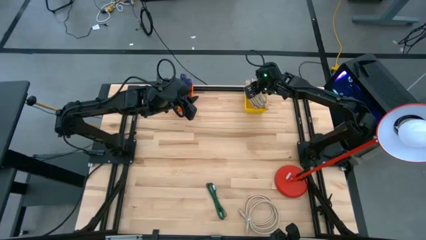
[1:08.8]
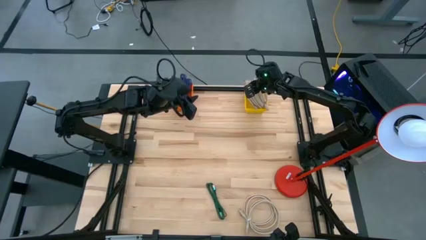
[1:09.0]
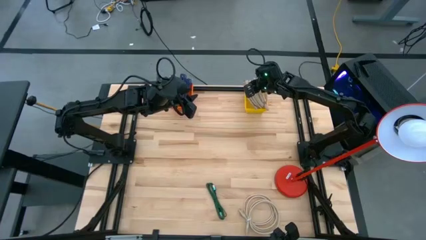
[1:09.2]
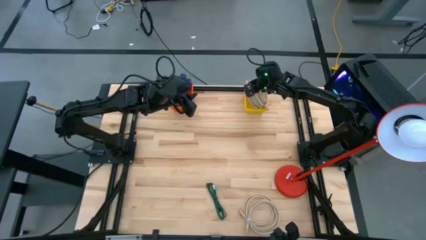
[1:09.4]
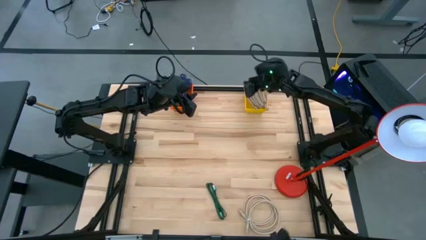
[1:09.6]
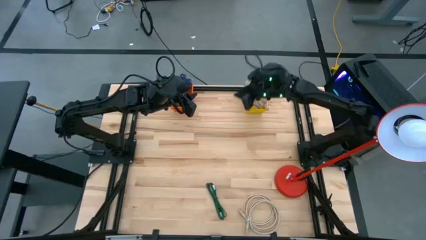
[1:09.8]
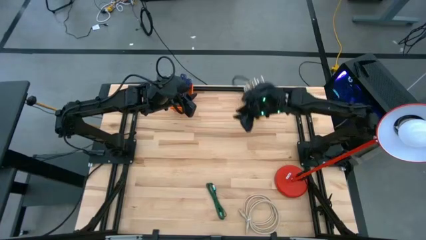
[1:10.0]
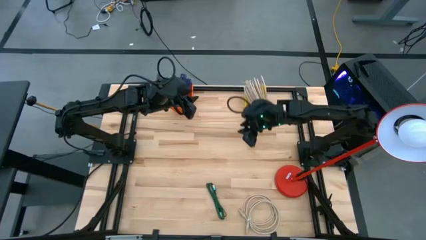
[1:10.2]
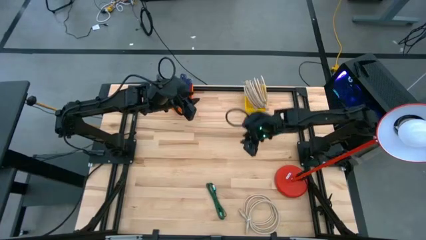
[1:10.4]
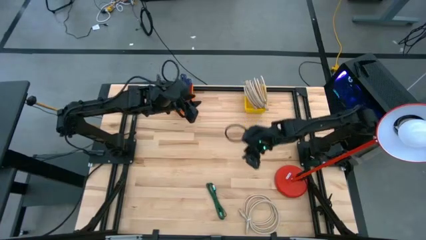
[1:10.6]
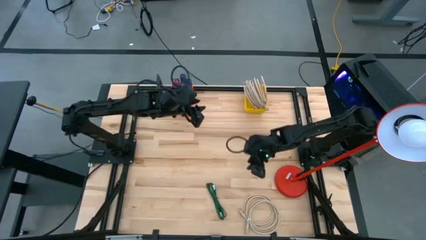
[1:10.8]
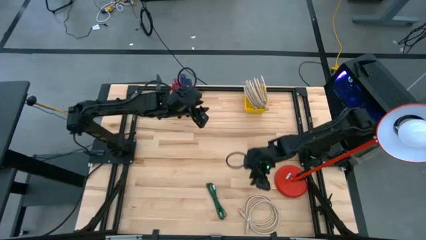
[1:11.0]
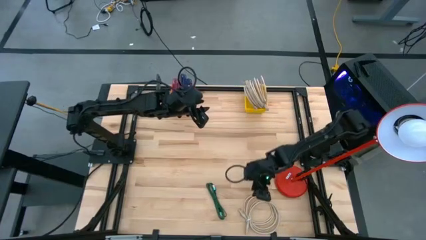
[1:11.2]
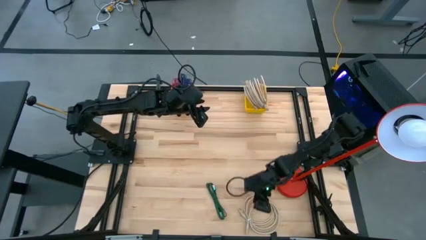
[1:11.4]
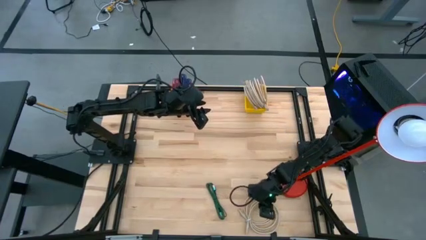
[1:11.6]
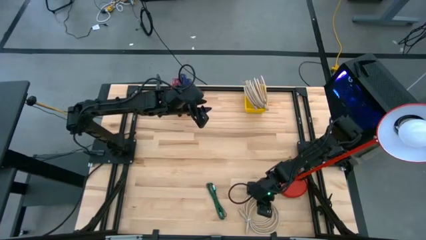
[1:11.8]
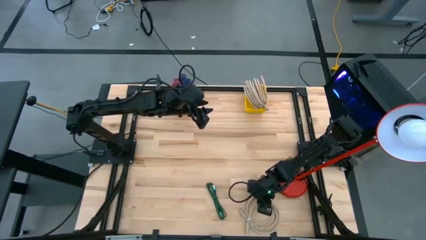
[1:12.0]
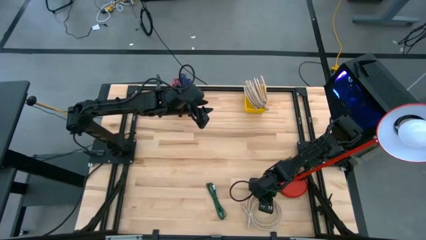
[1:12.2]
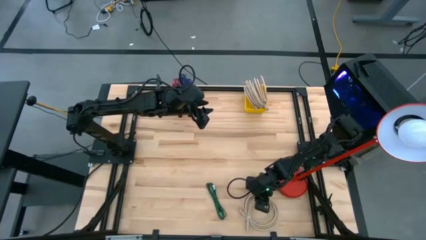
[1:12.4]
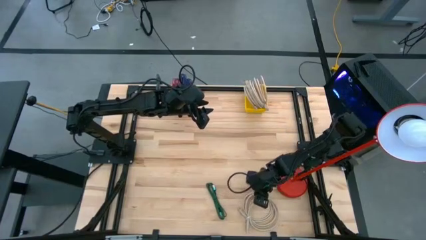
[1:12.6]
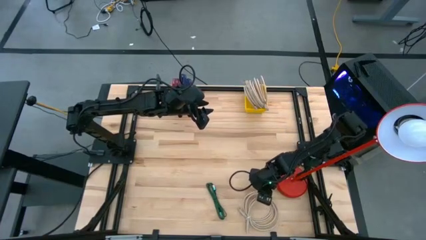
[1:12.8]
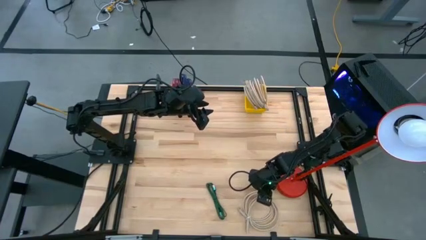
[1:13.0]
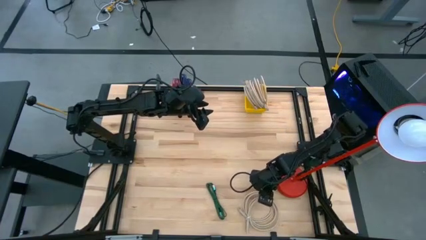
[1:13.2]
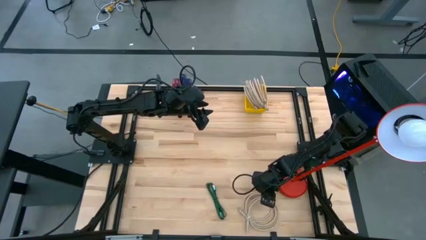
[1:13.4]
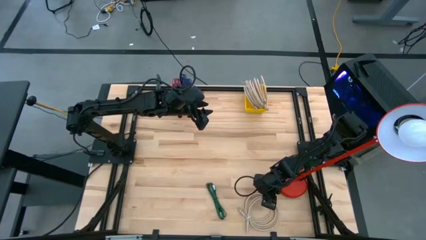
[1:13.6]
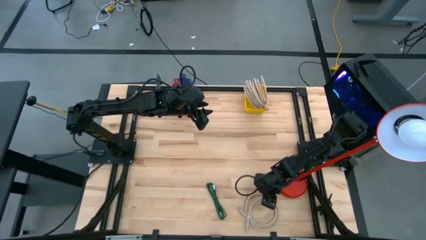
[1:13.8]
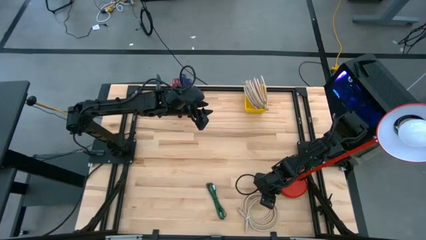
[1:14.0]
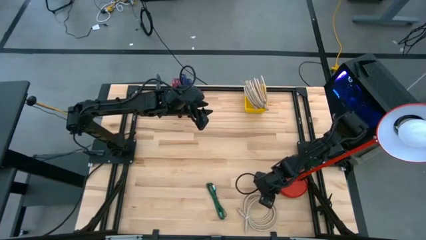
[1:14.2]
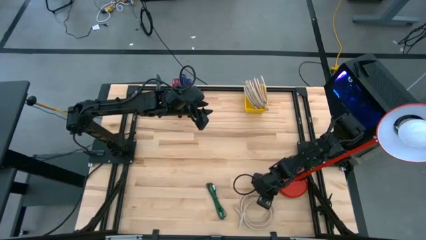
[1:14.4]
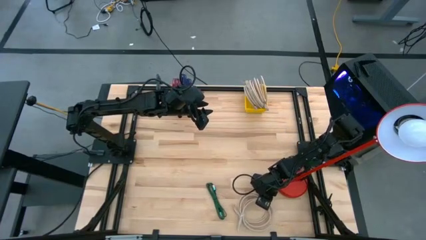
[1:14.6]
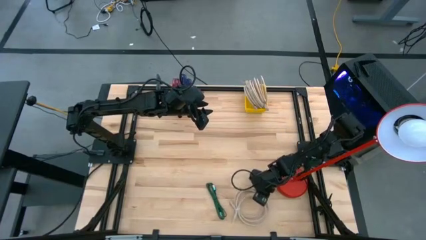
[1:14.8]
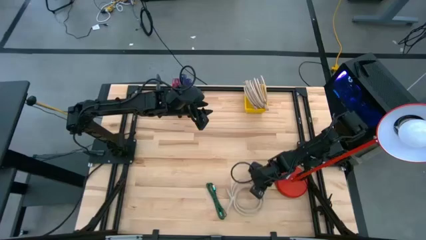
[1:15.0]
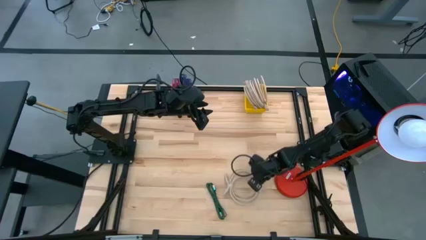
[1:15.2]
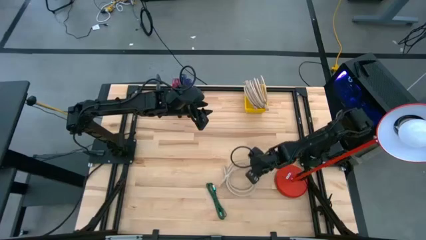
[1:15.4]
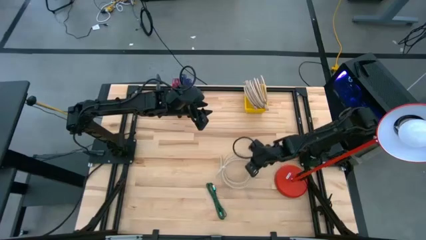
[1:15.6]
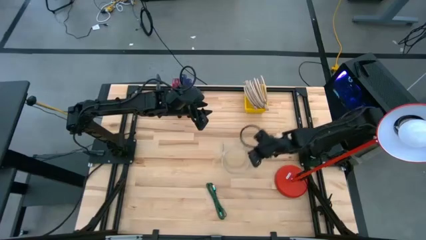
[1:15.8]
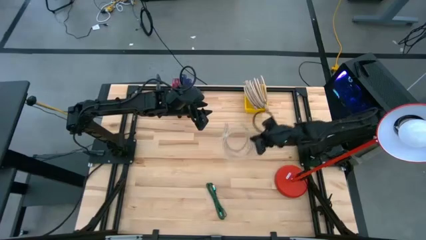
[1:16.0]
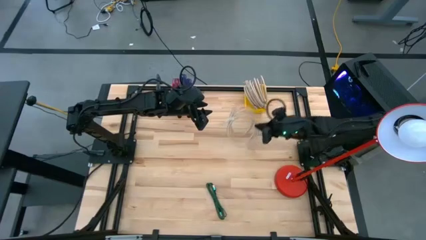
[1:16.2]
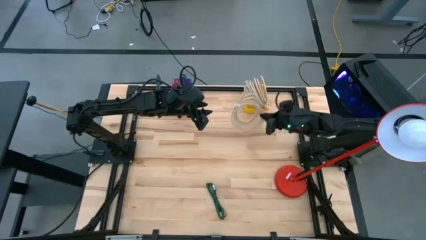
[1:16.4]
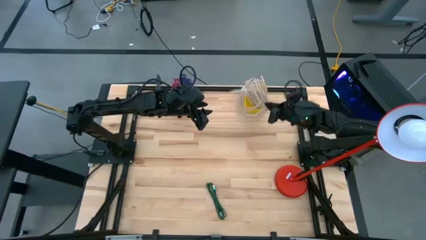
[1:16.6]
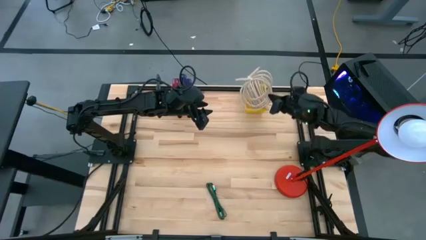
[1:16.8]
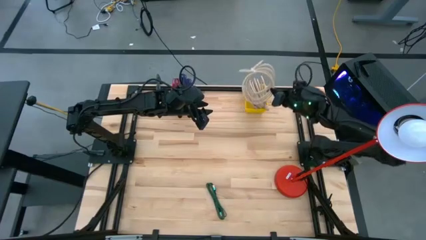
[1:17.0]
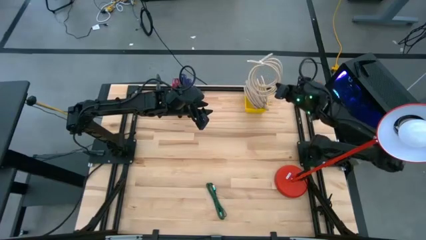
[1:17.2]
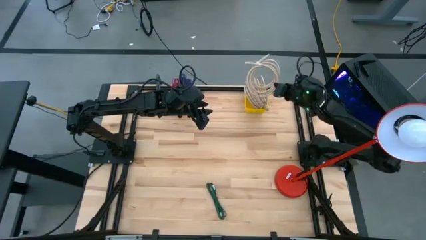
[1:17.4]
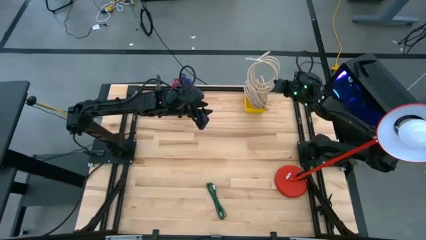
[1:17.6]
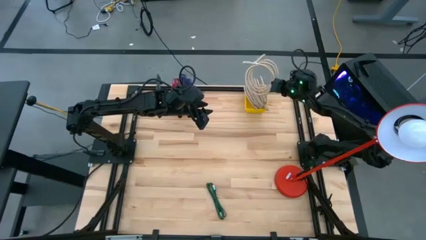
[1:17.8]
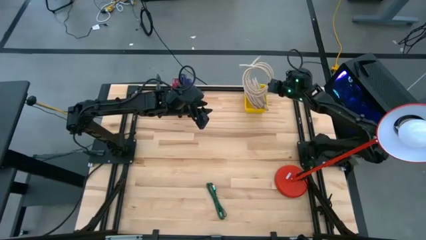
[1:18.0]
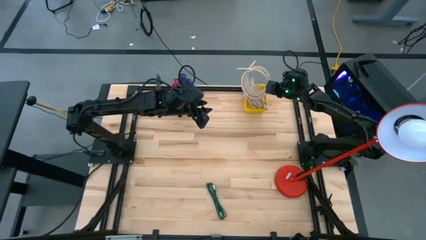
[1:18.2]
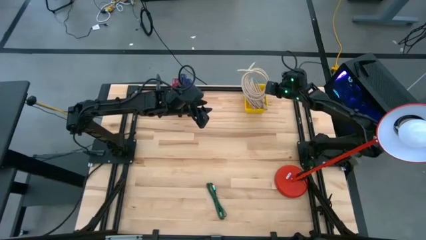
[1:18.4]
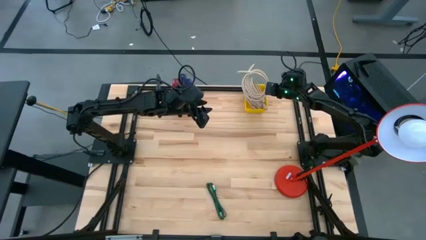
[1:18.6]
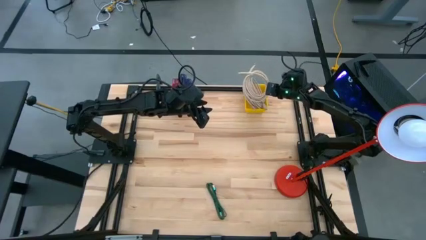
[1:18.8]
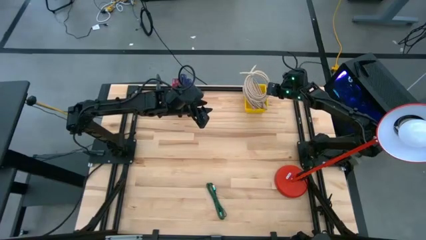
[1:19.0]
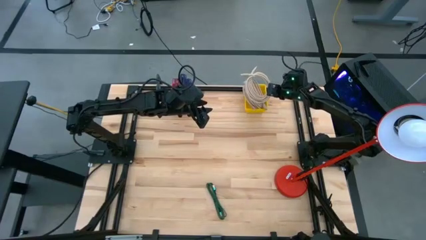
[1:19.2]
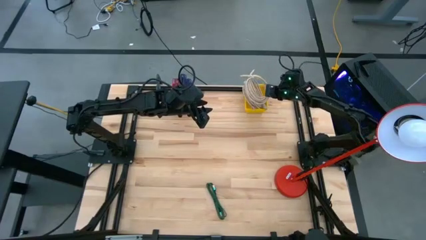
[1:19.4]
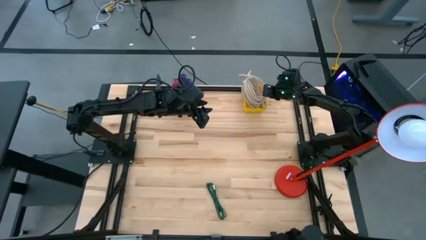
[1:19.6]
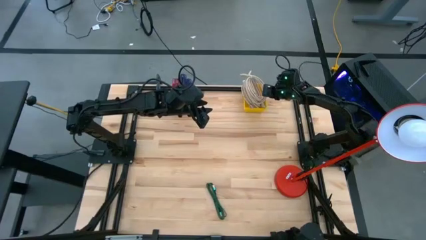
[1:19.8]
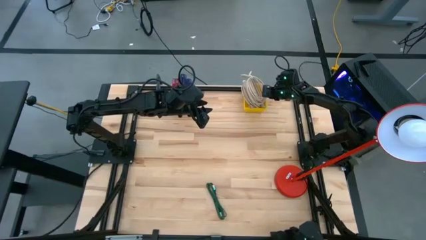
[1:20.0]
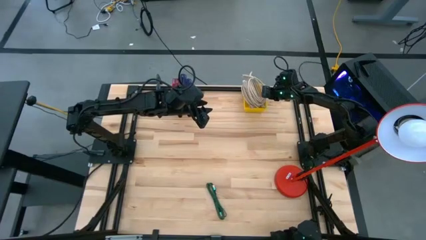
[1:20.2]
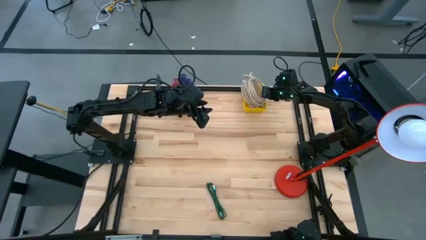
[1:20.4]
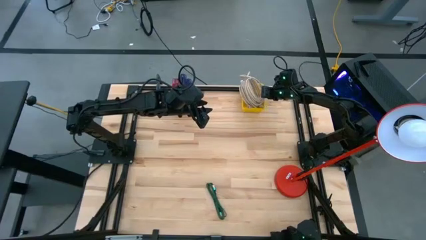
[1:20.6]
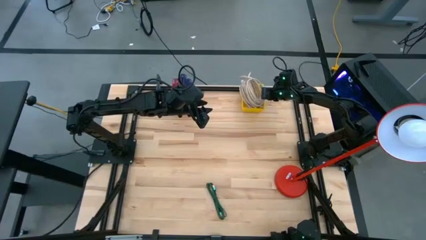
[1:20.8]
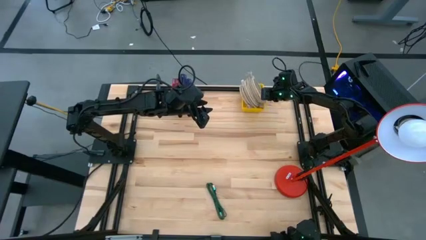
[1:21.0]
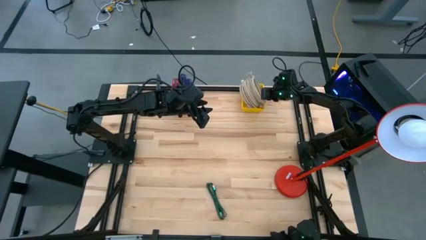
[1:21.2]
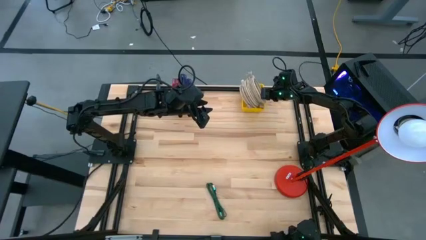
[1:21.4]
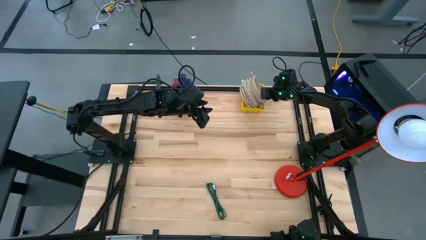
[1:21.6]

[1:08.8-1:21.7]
Task: Pick & Place USB Port
Put the brown HDMI cable into the yellow bin

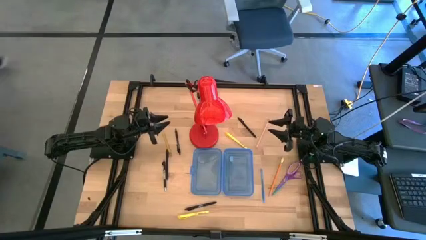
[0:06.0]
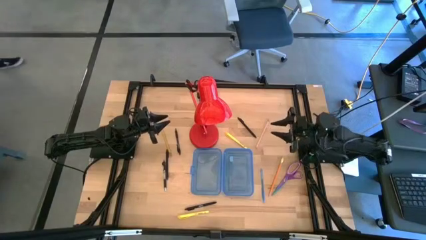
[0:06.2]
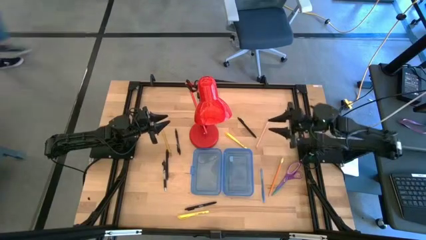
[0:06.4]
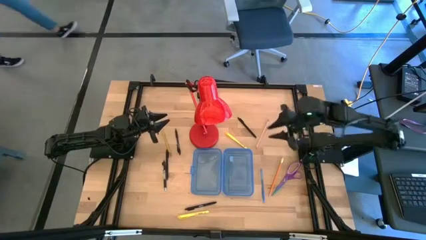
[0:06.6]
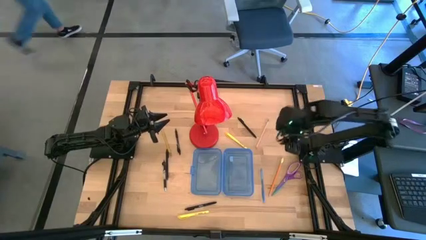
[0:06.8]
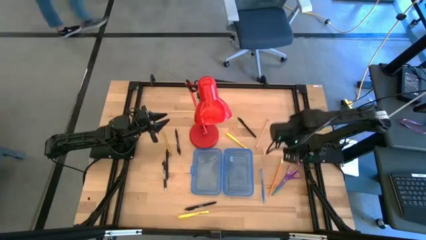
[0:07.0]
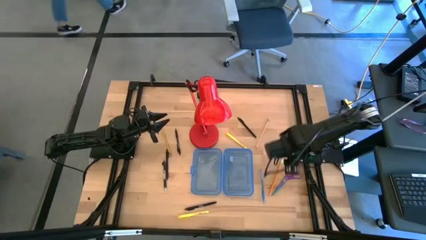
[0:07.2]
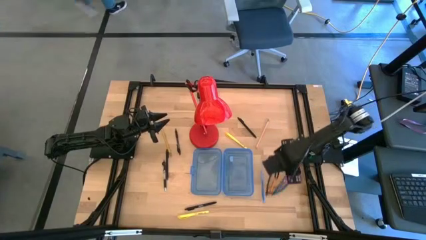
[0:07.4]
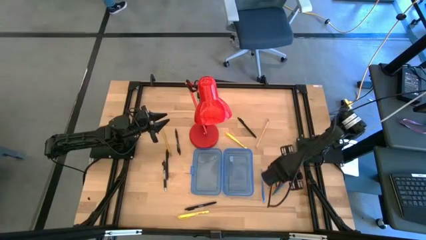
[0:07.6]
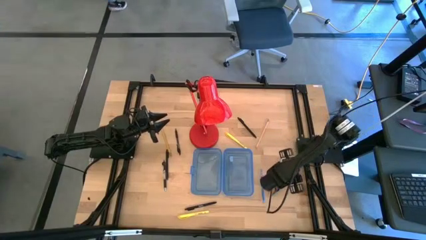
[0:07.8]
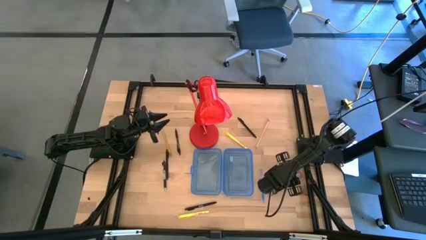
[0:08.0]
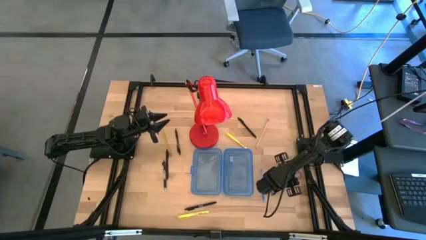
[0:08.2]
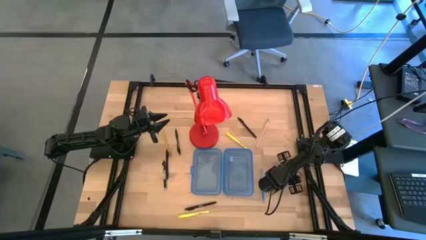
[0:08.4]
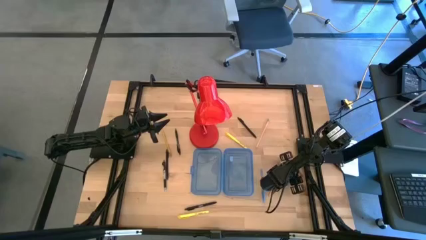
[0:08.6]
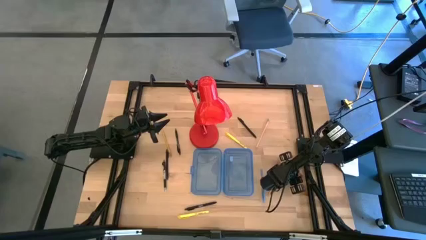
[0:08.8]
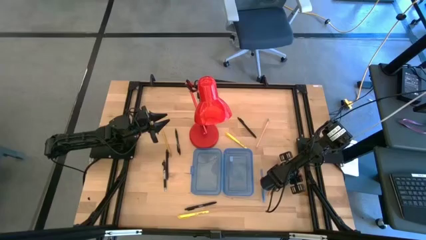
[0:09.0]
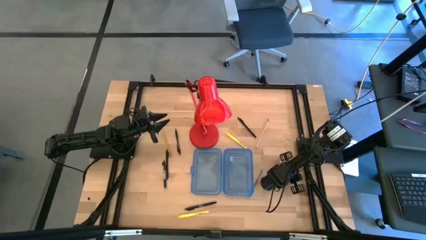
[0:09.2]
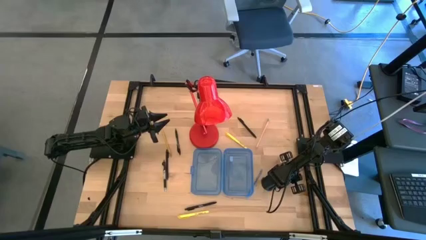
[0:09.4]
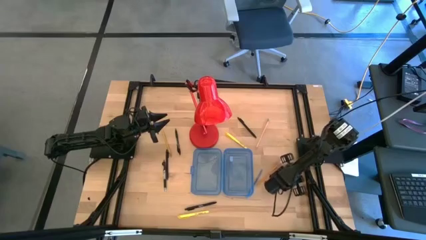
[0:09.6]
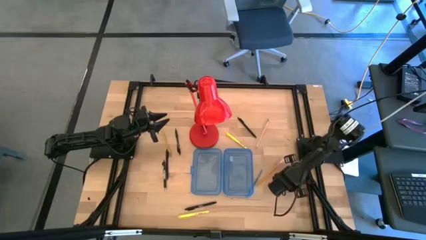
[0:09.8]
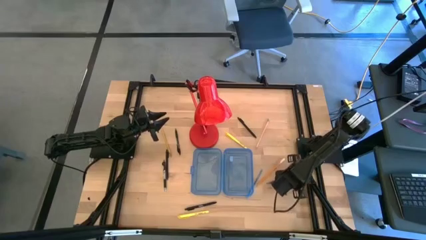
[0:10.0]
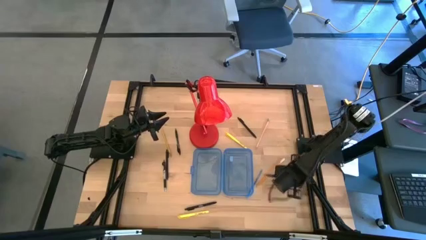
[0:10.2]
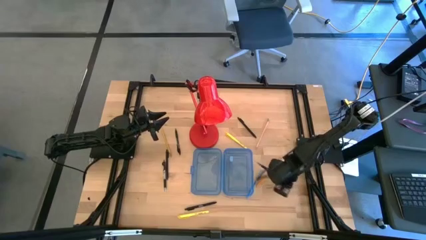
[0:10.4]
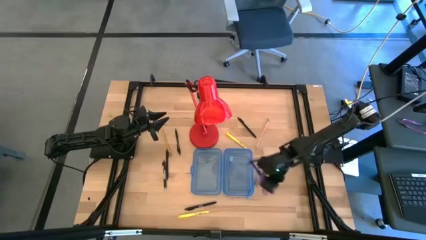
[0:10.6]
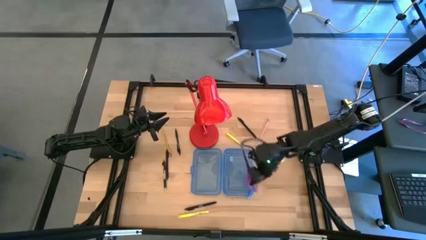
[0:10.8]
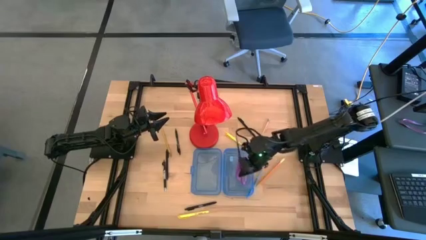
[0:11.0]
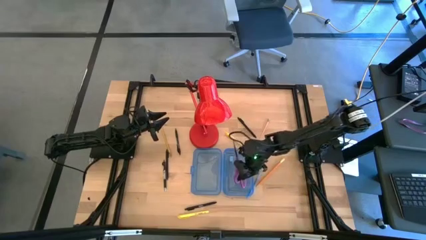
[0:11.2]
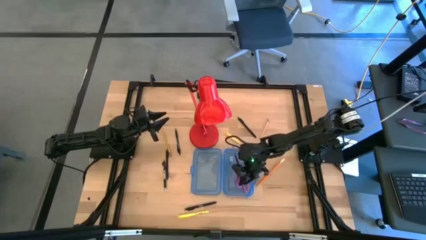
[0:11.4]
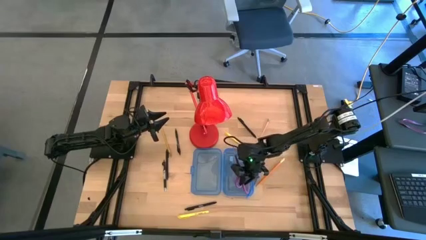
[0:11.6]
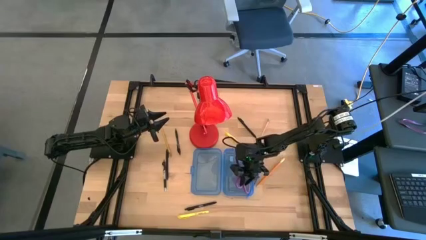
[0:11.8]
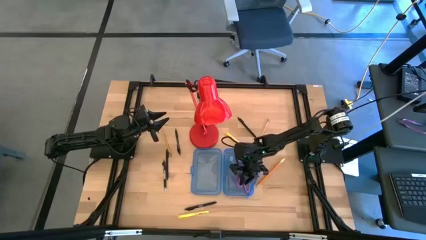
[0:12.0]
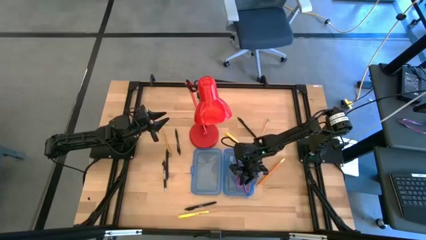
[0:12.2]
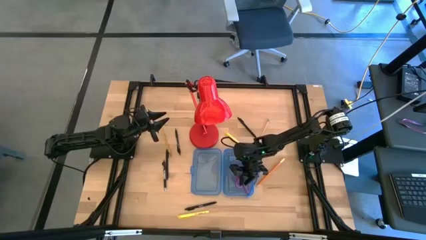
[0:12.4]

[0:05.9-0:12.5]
Task: Pick & place school supplies into a supply box
Put the purple scissor into the blue supply box
